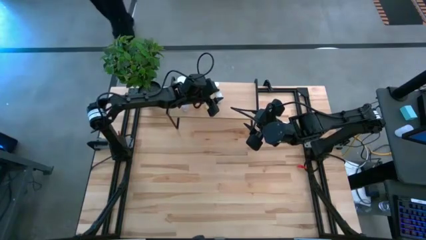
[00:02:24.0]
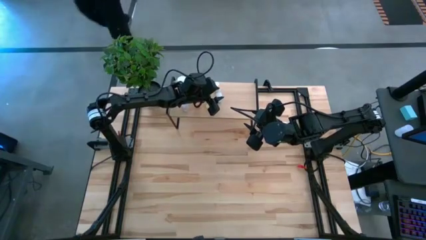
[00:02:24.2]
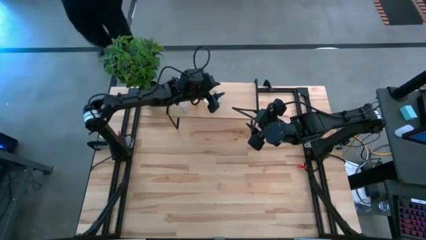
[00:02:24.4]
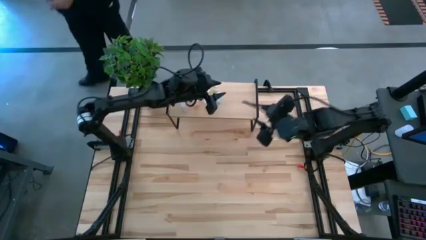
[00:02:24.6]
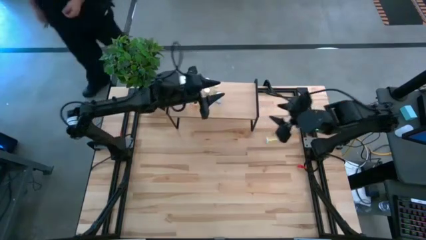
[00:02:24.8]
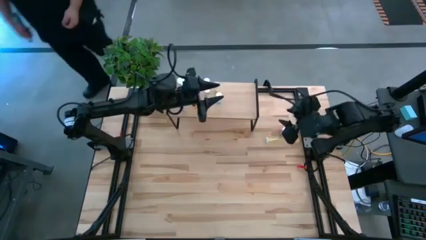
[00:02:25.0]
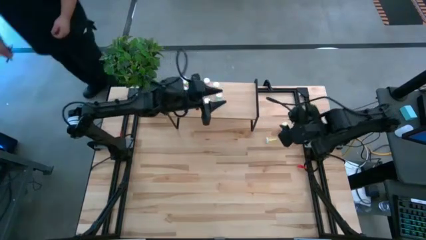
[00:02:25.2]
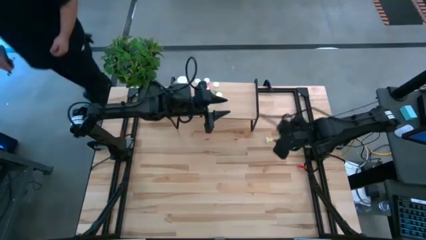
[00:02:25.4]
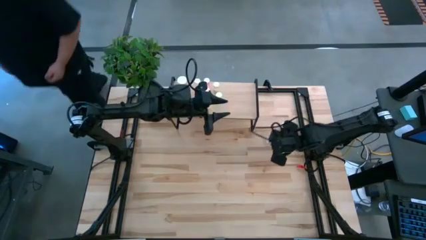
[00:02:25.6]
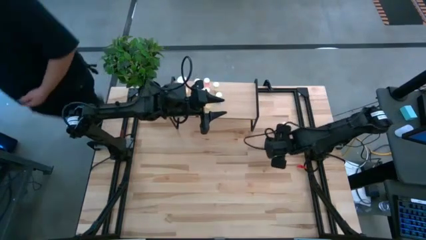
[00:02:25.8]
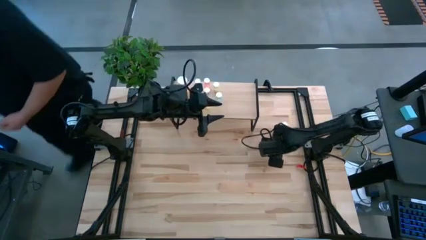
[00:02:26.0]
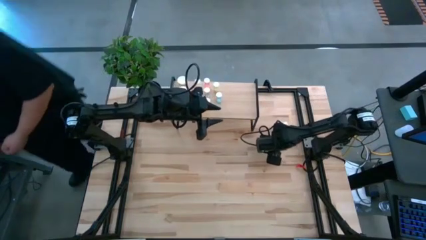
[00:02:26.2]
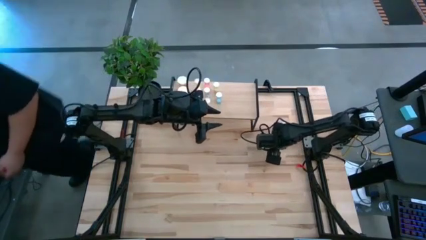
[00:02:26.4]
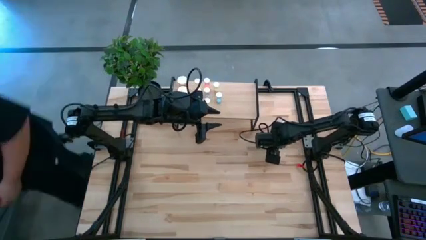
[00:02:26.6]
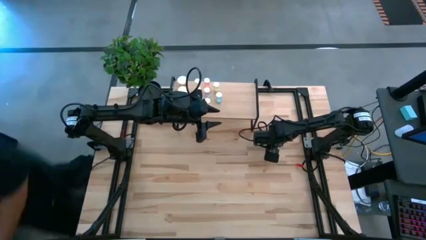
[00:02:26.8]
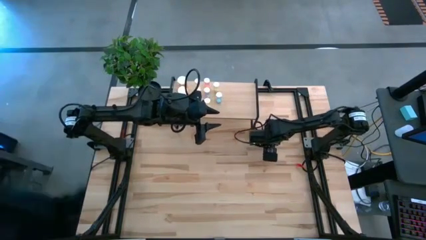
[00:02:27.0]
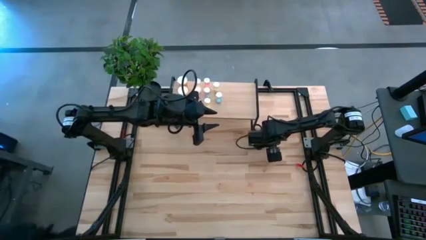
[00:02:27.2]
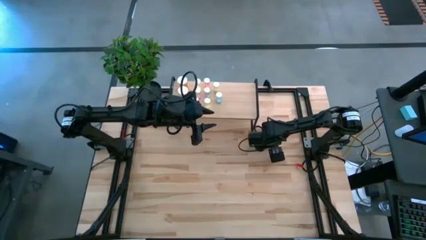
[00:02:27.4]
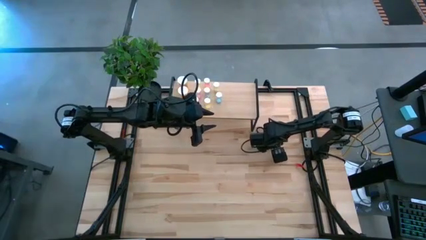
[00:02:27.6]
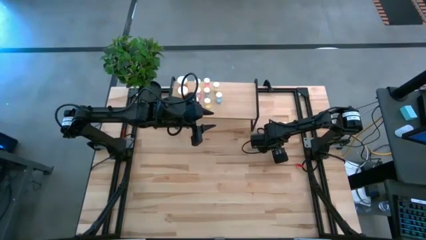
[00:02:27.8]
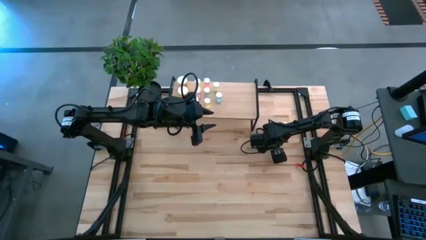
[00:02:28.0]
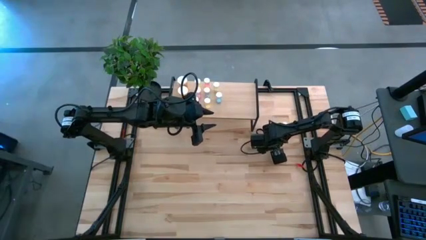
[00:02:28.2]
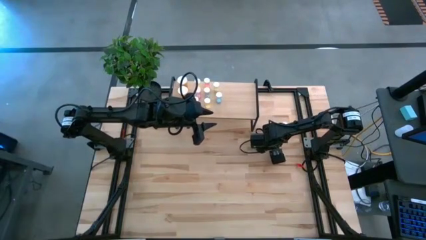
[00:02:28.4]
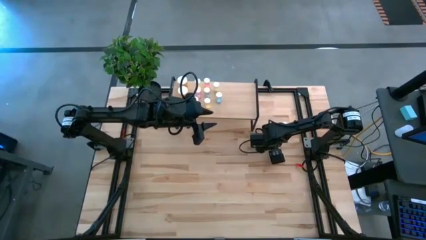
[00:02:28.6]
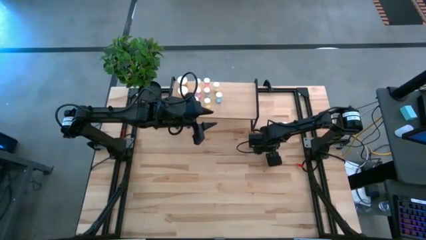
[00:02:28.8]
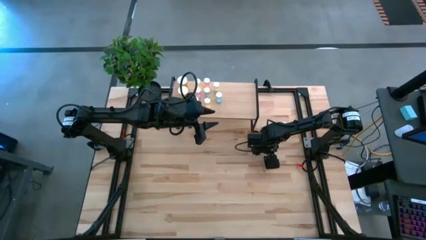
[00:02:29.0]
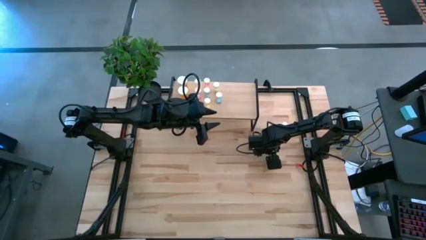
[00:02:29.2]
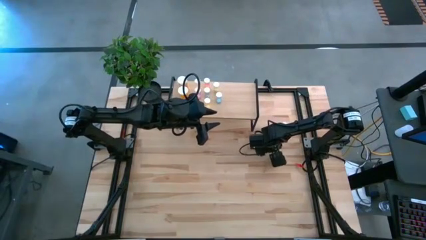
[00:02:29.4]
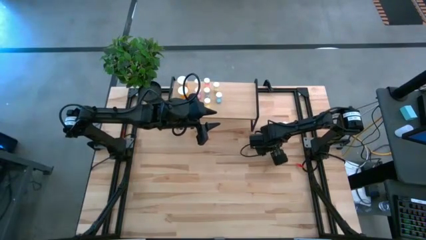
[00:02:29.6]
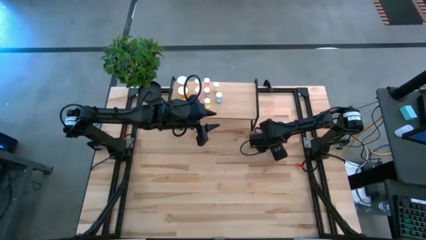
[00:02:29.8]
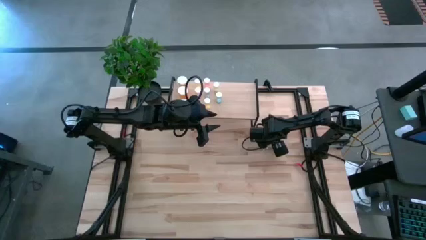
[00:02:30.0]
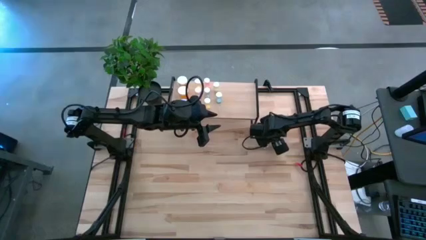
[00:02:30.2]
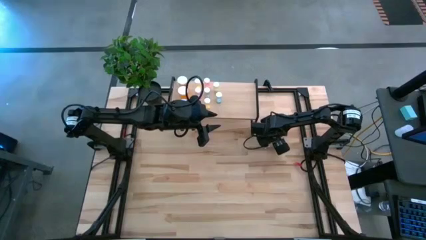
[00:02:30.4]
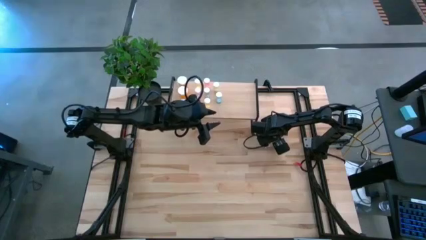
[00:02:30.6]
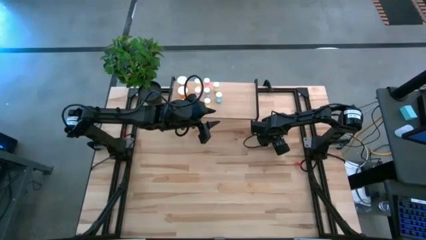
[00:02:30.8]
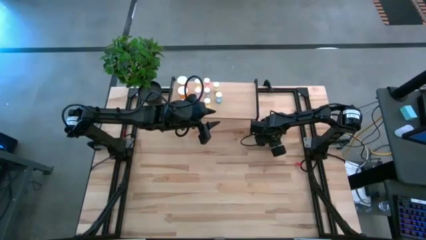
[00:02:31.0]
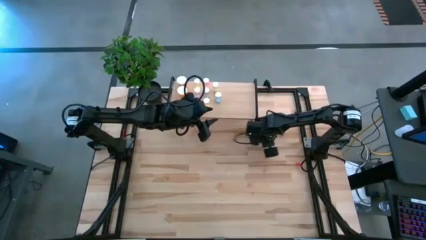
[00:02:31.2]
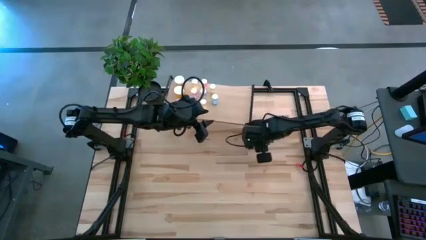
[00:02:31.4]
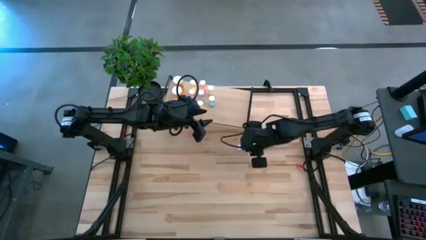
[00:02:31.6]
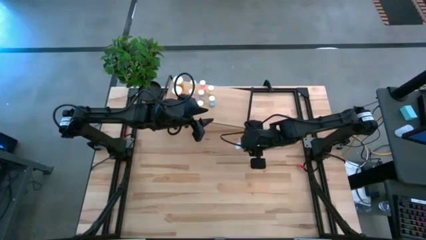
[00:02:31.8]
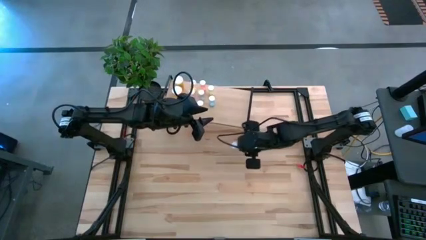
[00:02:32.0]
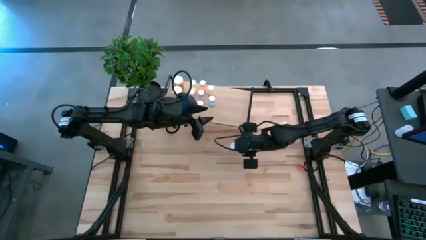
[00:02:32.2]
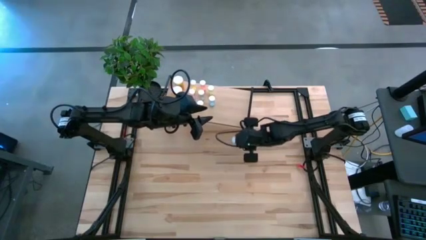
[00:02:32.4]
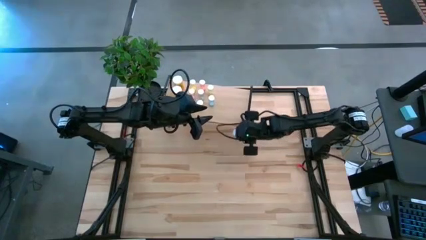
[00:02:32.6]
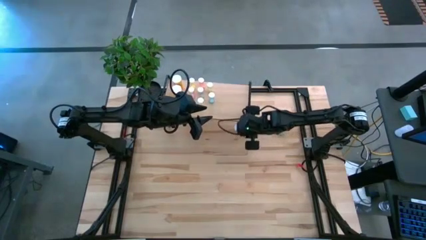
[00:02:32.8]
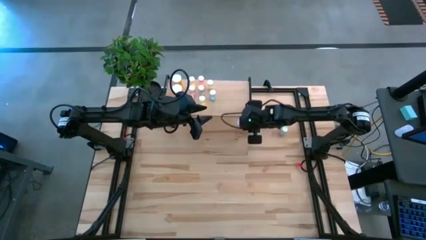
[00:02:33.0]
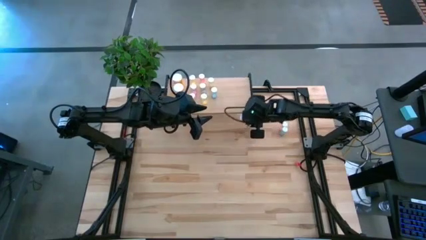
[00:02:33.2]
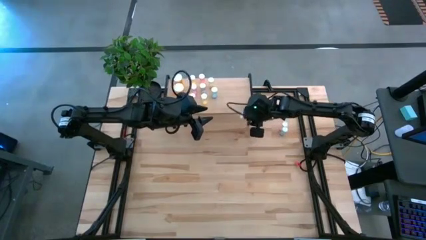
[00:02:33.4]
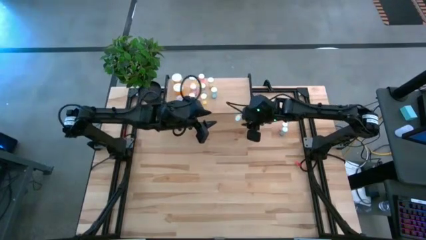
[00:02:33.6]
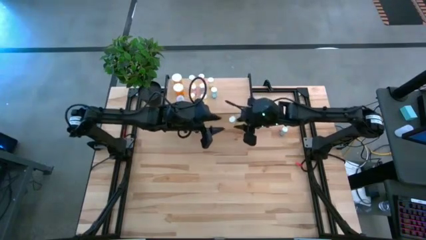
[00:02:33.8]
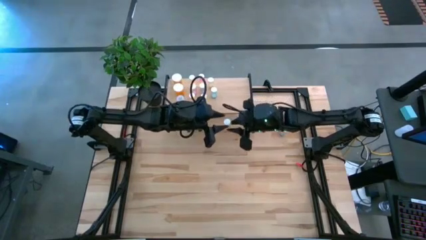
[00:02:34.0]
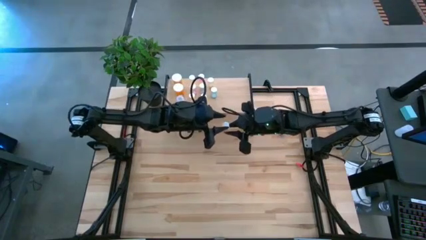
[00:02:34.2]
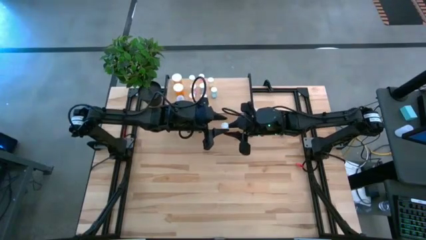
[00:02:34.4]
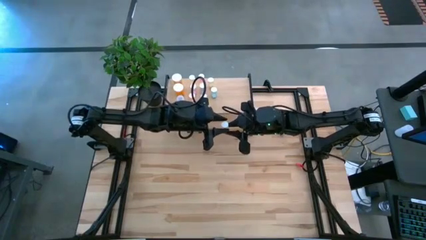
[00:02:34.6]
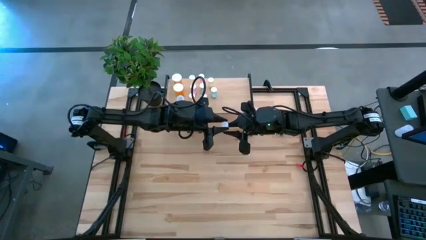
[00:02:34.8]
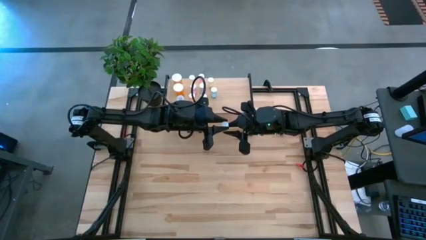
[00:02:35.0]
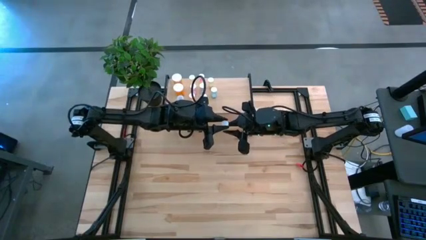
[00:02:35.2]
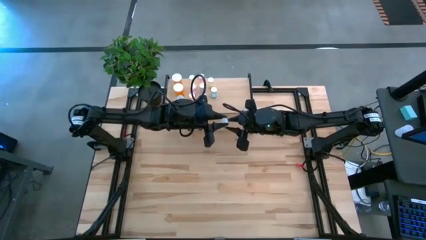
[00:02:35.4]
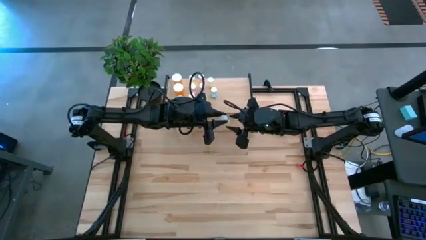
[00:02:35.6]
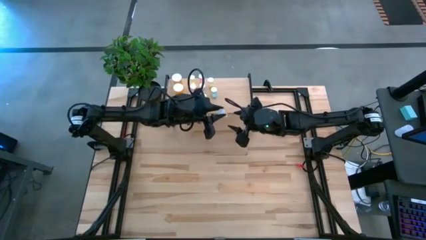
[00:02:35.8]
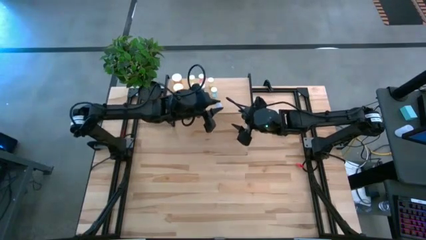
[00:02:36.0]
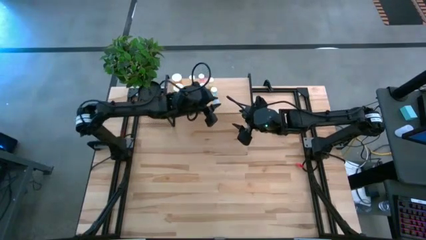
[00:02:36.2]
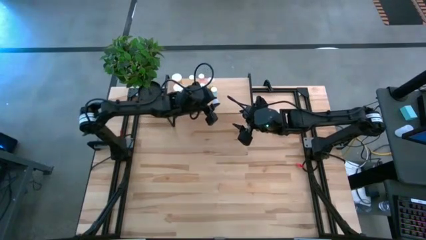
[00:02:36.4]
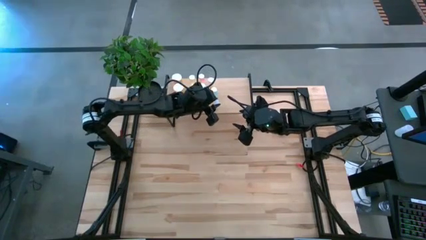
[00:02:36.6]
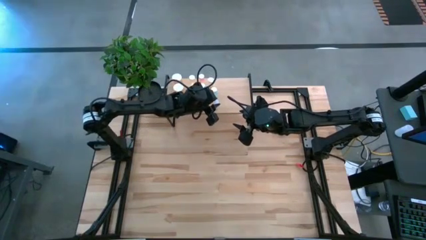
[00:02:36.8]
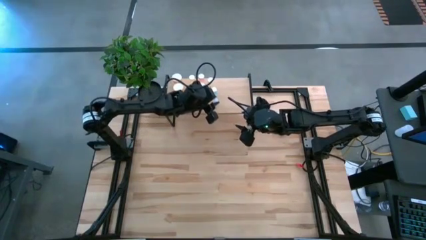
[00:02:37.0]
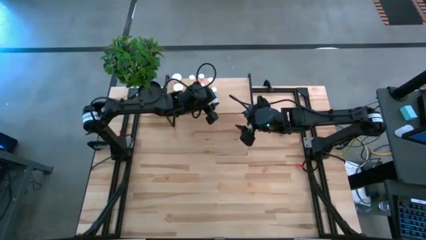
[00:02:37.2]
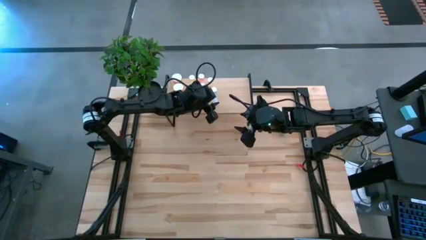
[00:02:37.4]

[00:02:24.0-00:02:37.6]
Task: Pick and place medicine bottles onto shelf by color
Put the yellow pill bottle on the shelf

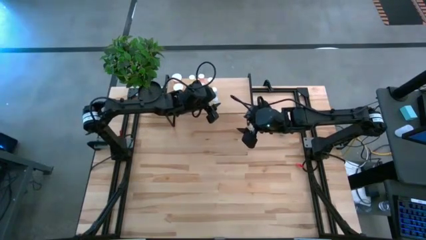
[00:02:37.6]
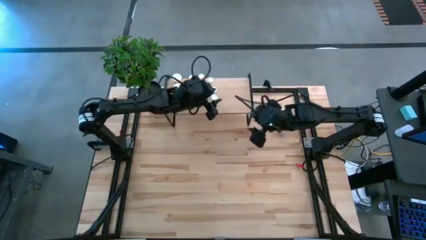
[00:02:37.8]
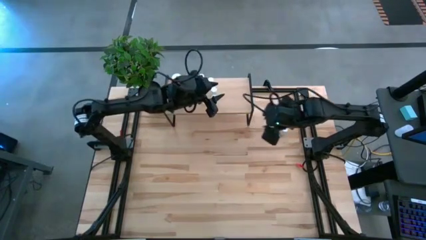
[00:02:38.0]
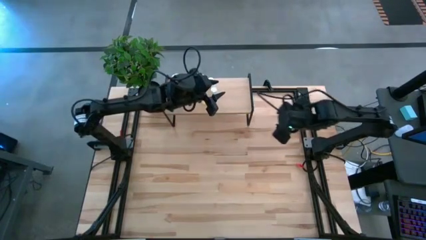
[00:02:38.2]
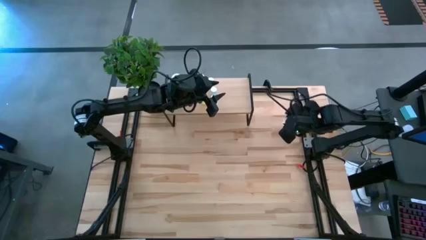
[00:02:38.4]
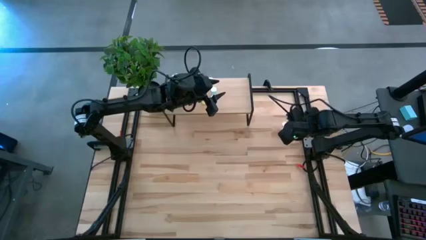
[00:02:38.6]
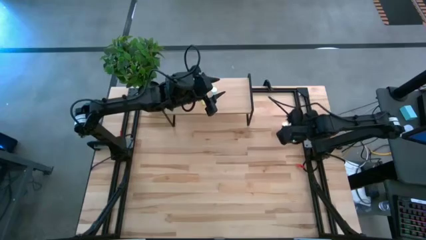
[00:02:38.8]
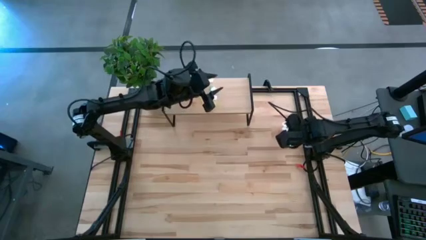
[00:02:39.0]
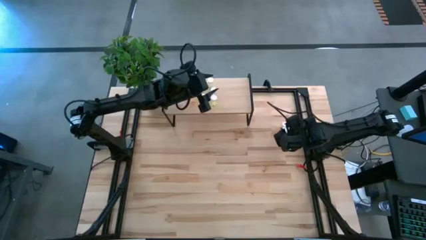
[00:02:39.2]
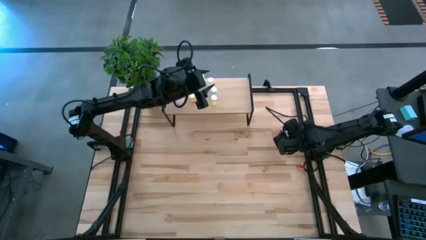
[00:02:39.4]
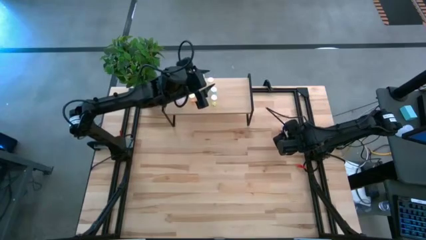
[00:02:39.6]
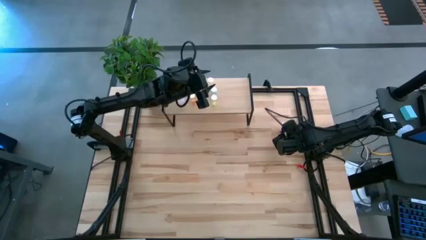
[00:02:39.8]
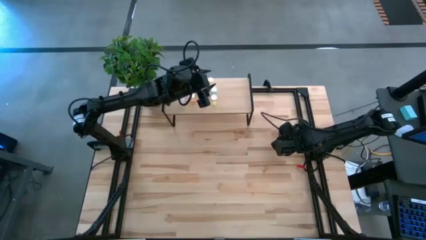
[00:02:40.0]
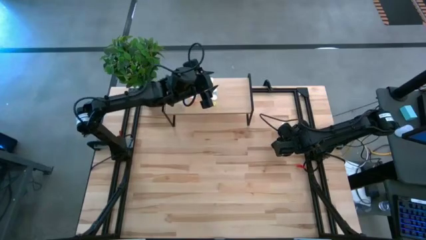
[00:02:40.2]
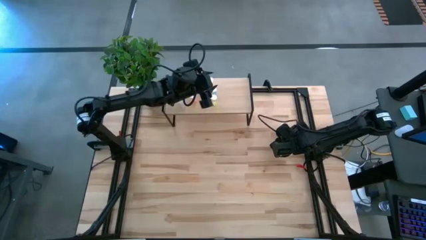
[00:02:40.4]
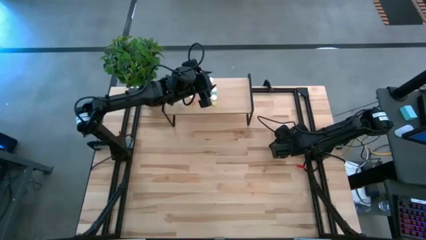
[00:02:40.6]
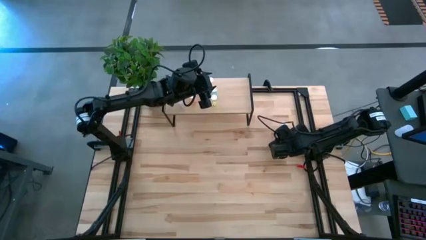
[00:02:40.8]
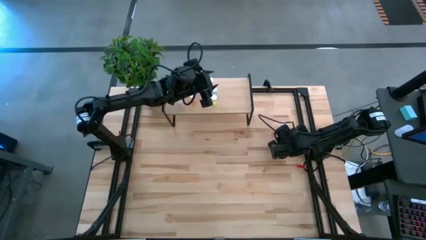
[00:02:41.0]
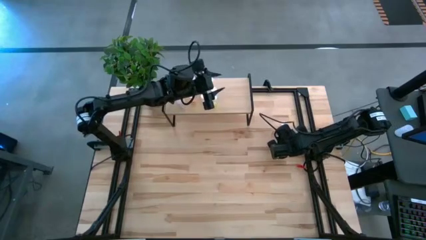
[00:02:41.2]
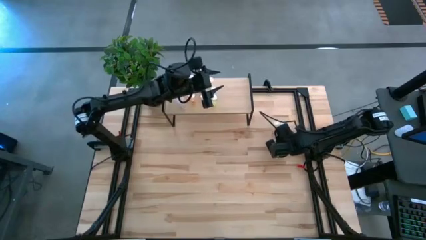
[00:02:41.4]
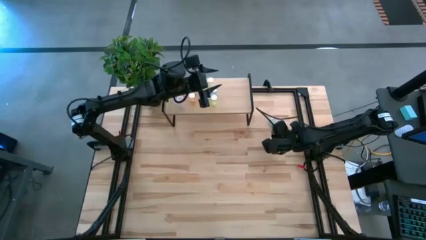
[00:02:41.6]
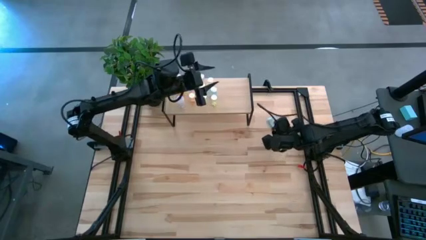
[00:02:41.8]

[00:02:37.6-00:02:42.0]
Put the blue pill bottle on the shelf
